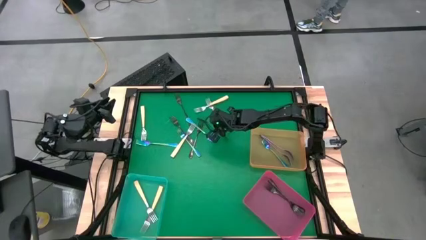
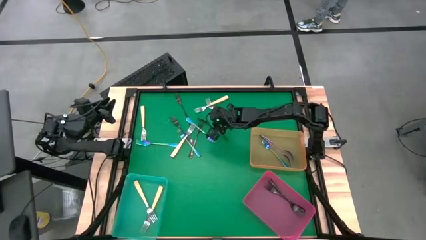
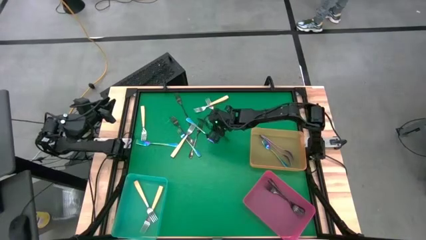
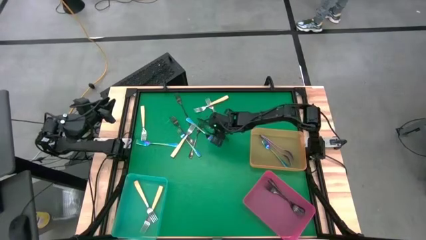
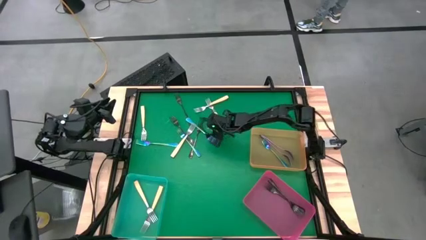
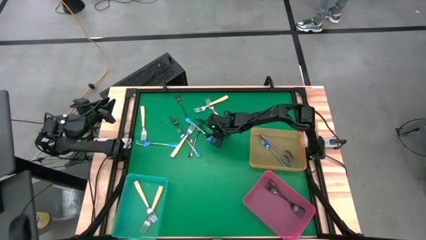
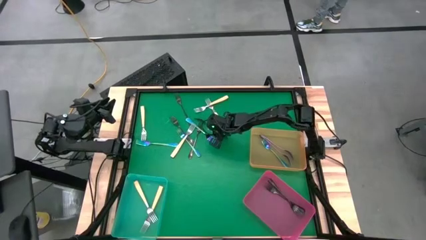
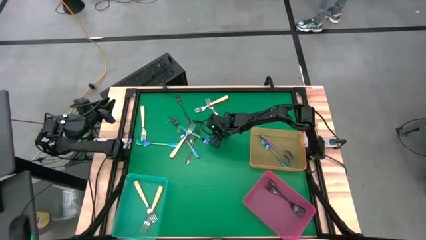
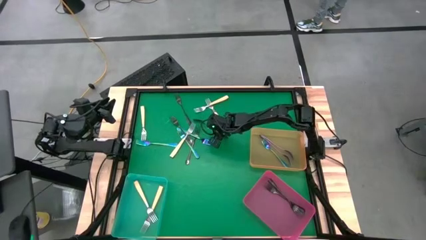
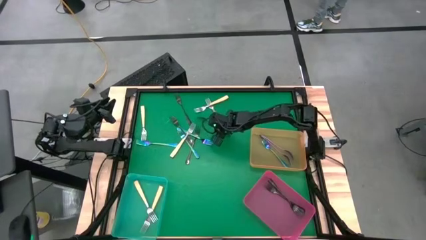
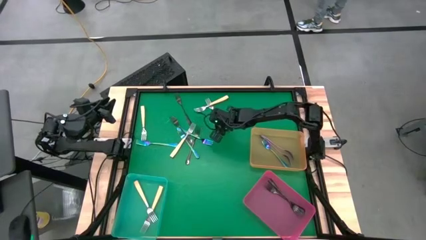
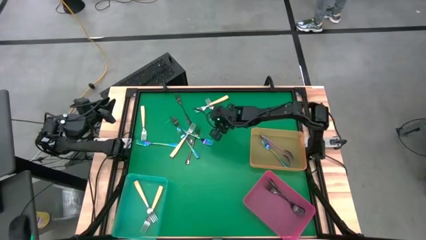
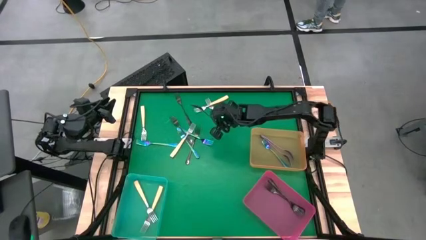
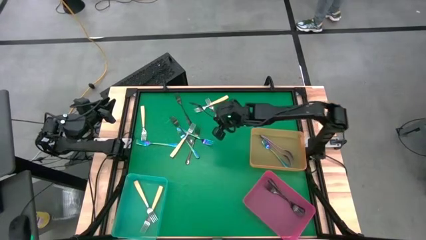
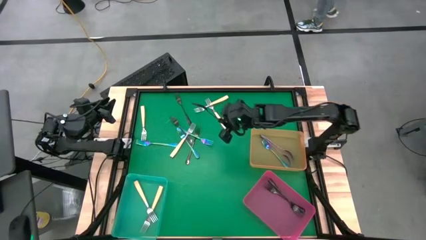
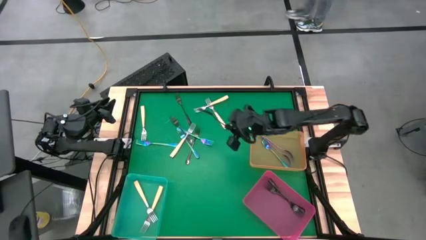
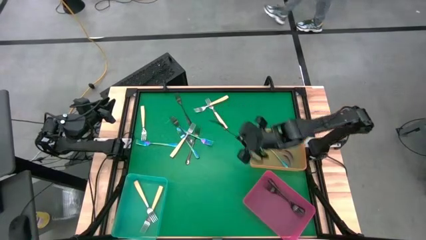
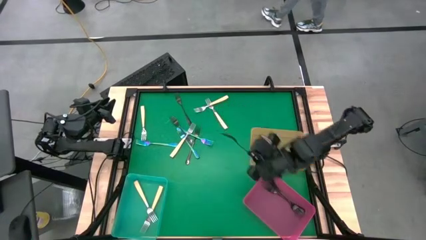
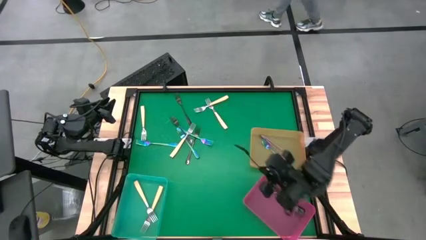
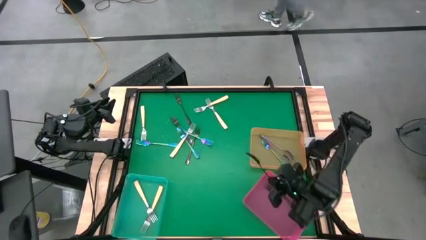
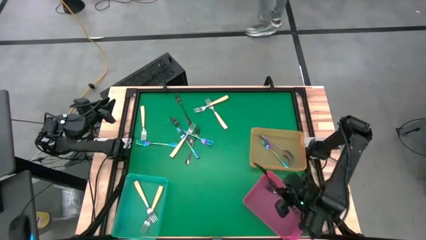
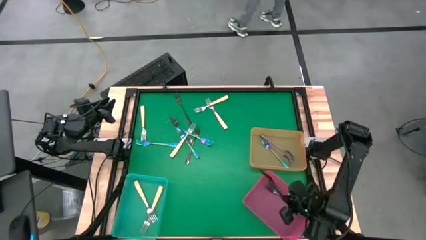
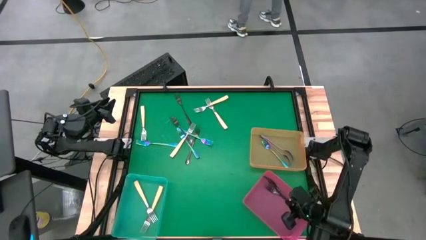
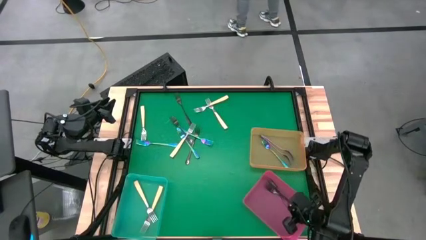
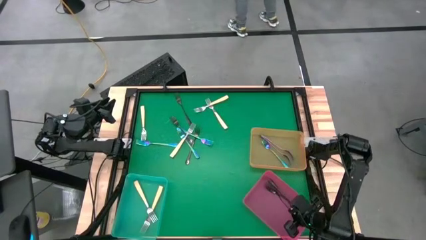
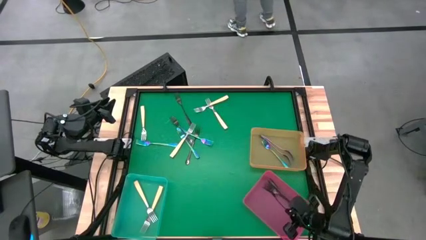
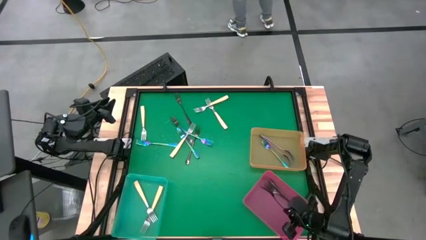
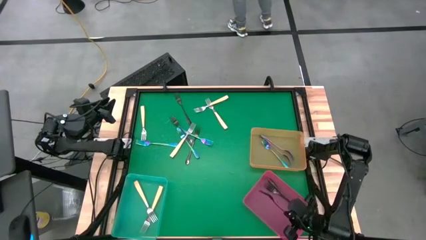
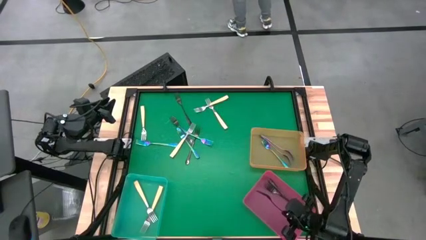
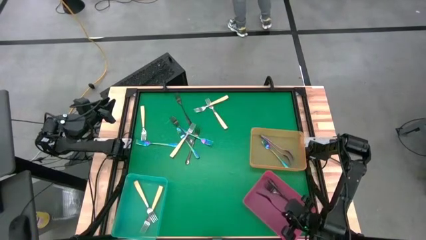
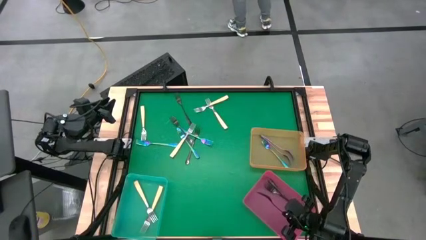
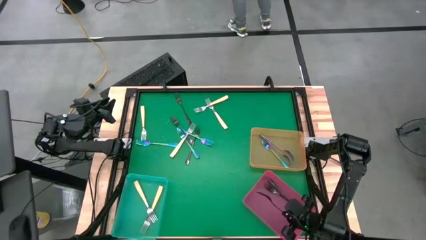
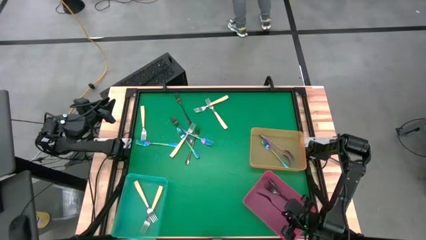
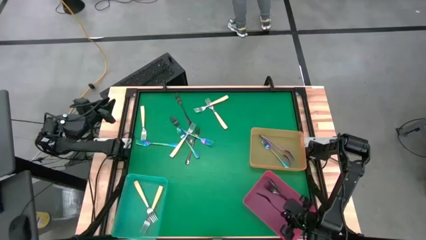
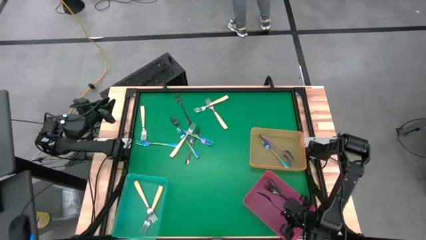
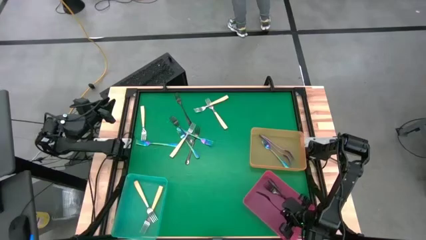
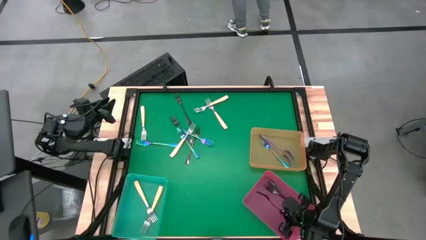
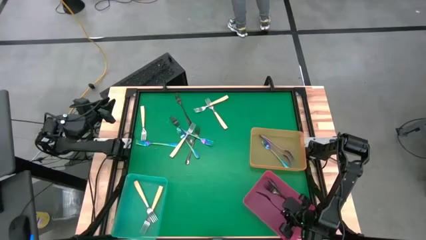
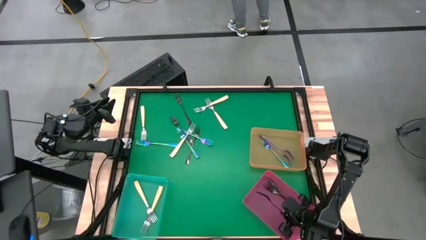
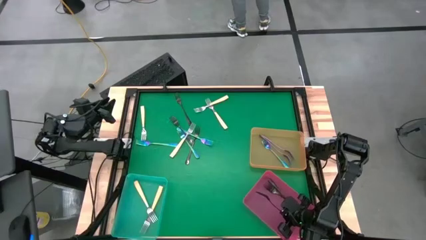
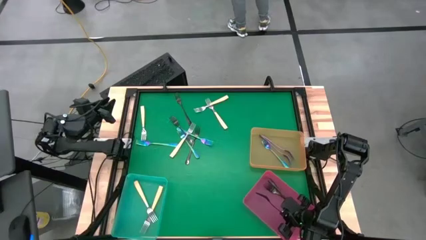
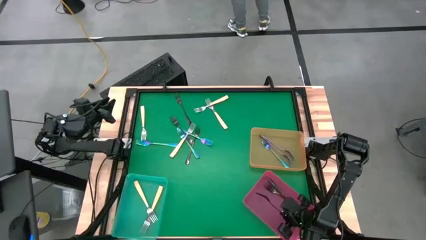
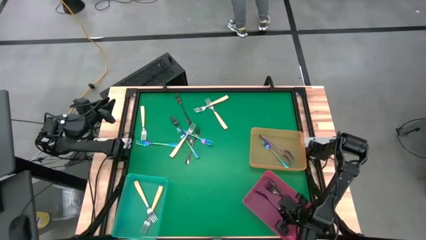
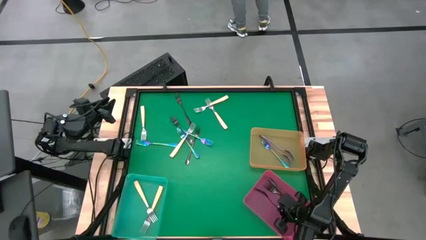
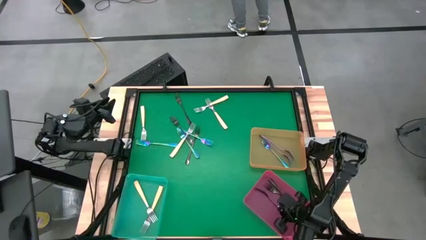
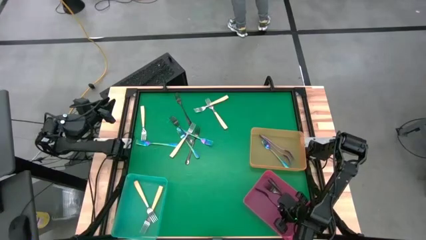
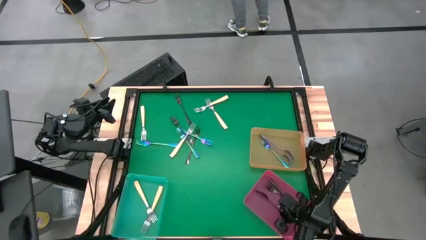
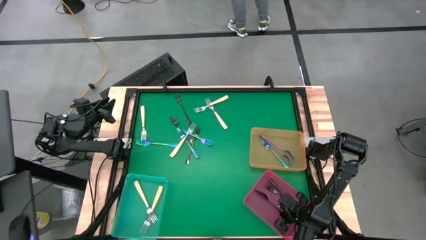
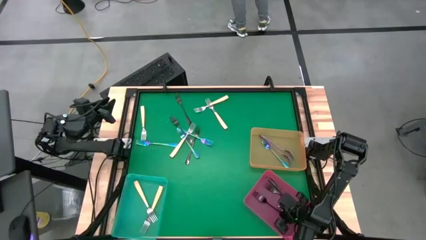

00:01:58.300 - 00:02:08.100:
Task: Sort silverware by color (type)
Put the black fork into the pink bin

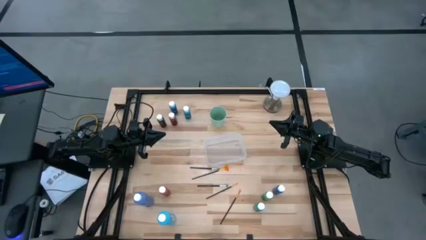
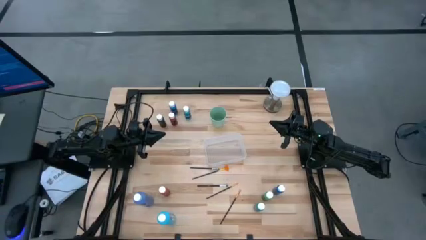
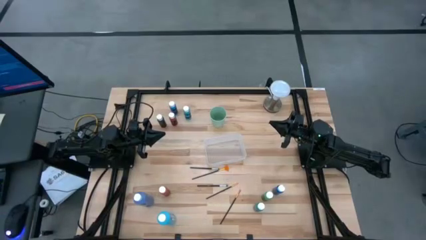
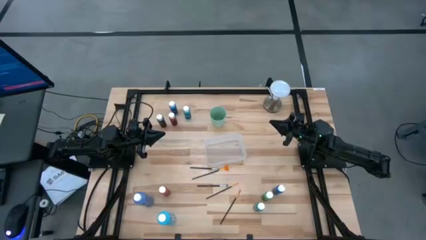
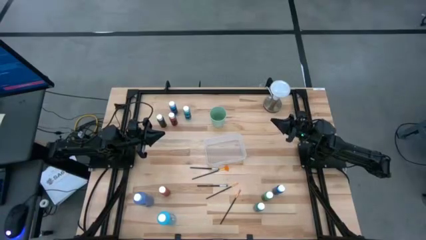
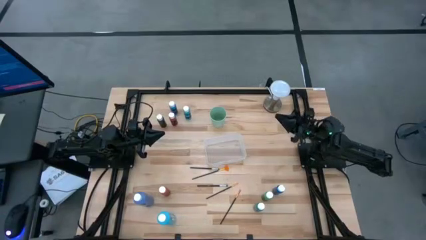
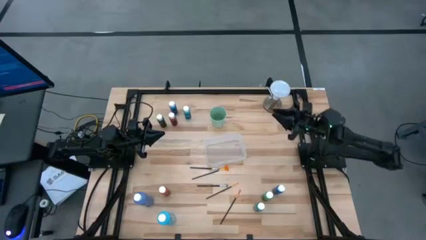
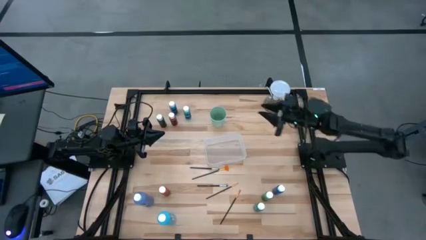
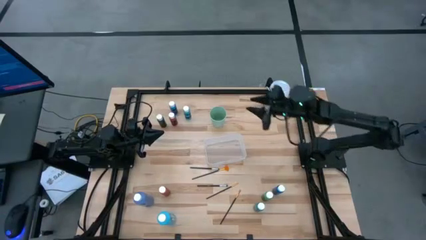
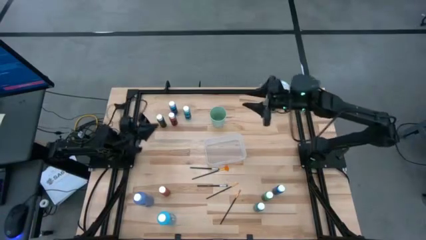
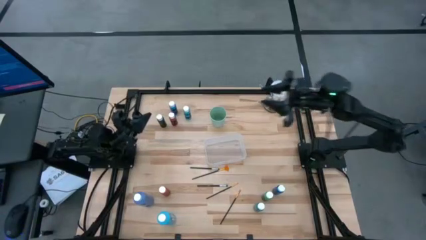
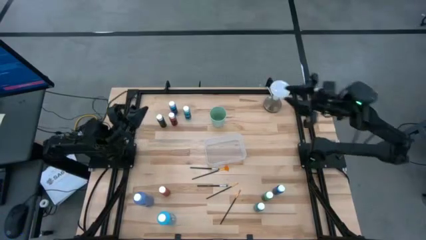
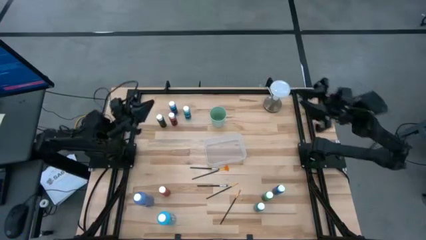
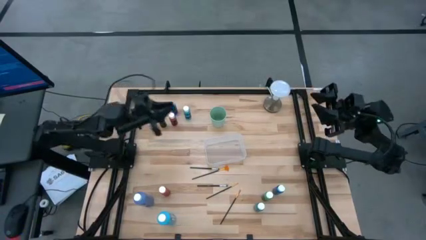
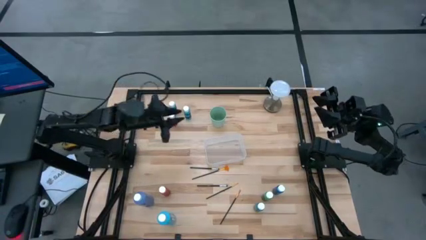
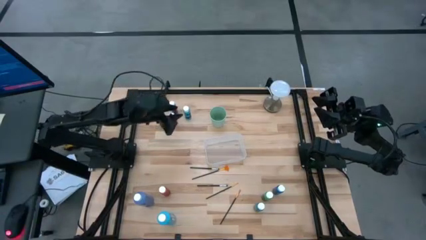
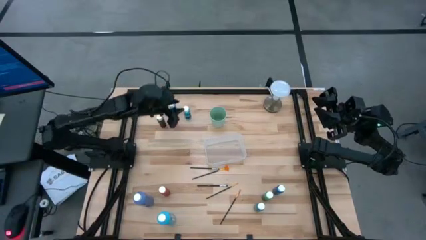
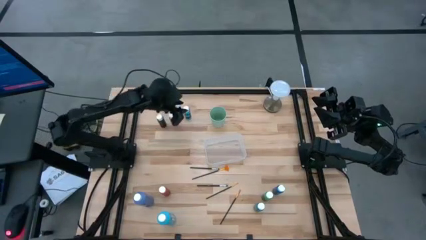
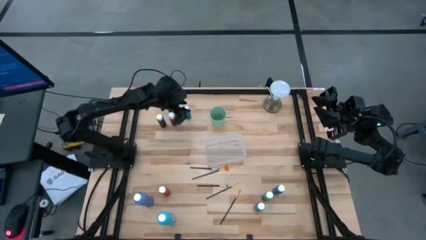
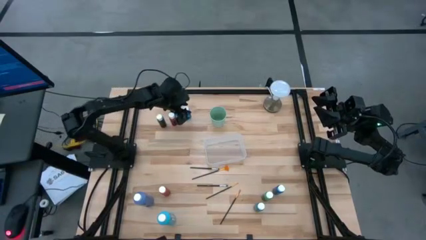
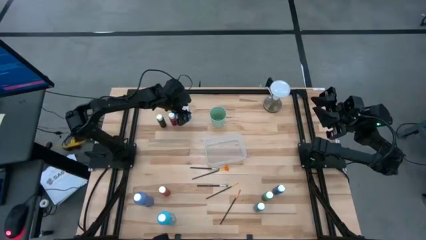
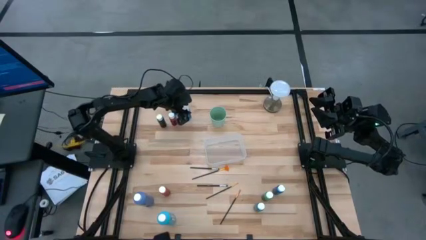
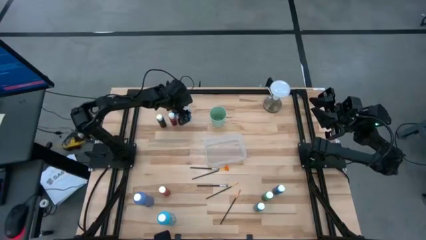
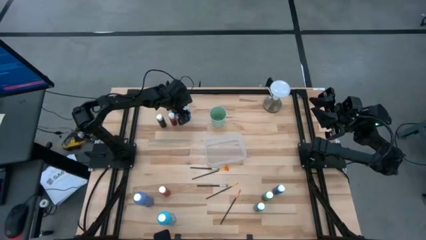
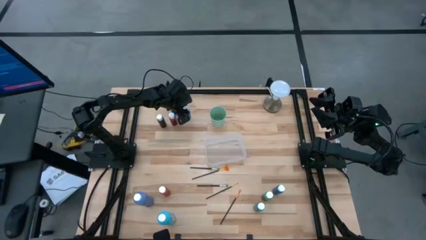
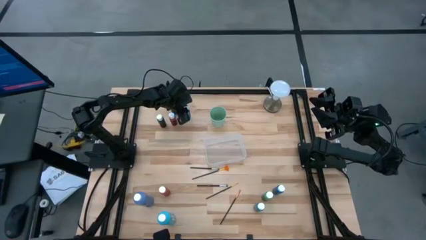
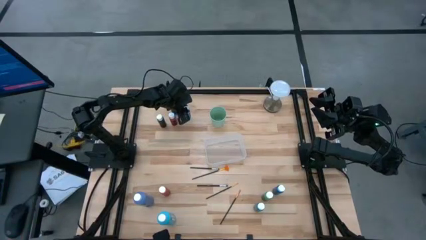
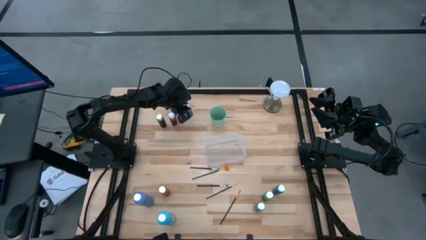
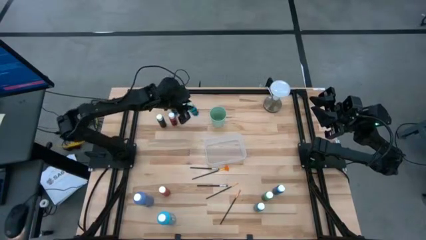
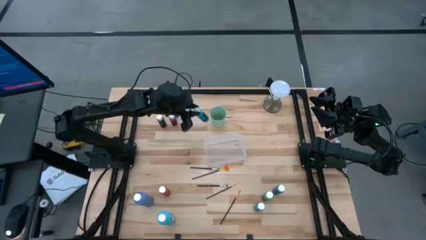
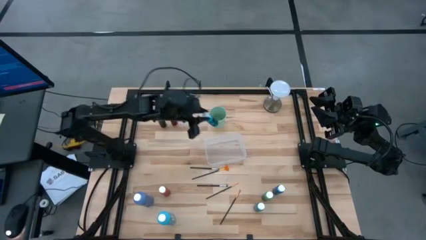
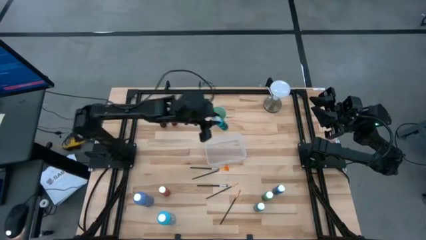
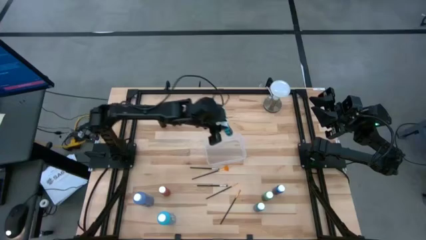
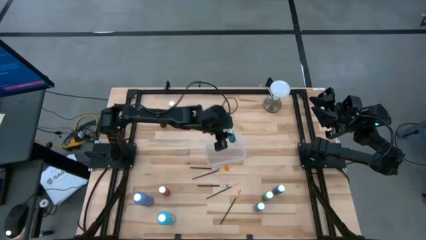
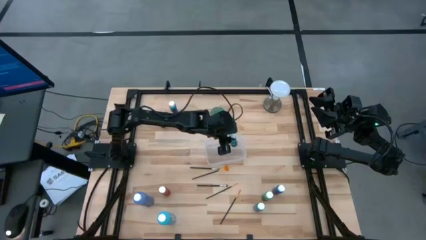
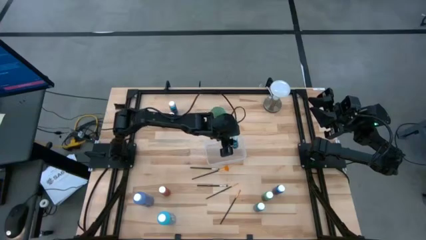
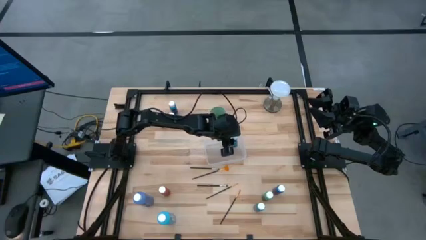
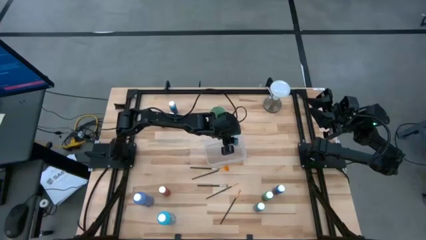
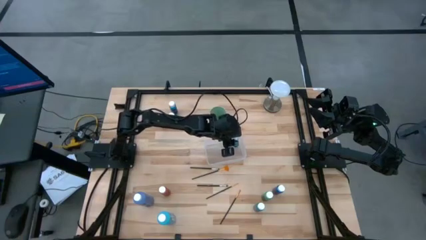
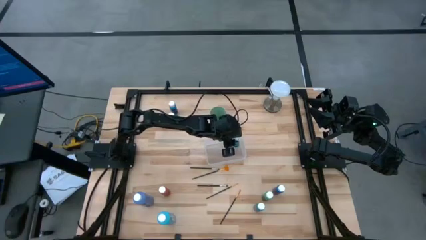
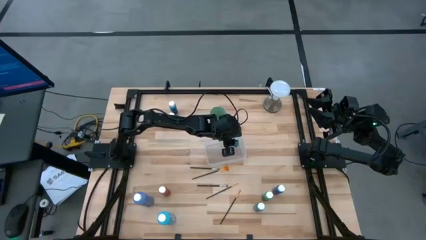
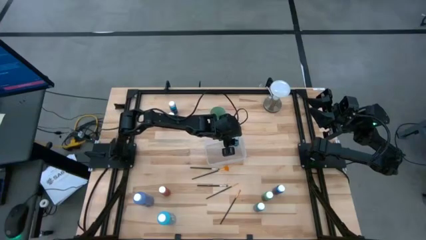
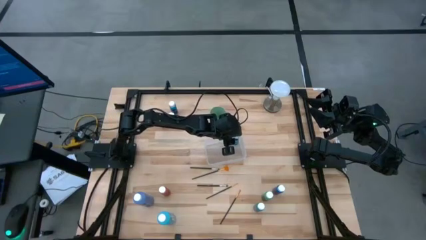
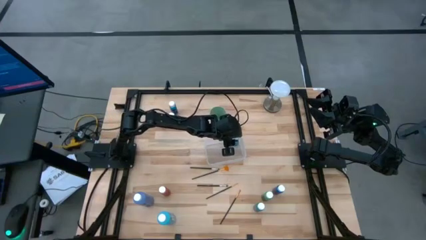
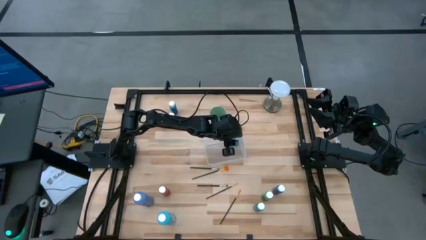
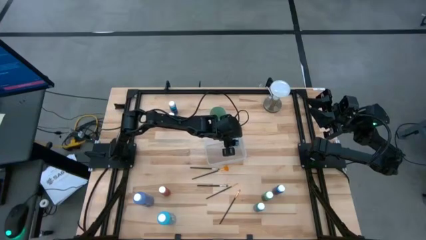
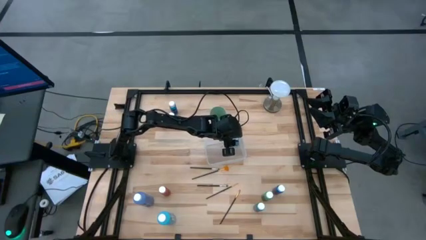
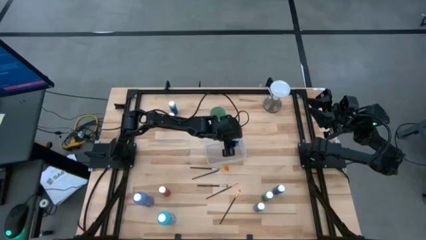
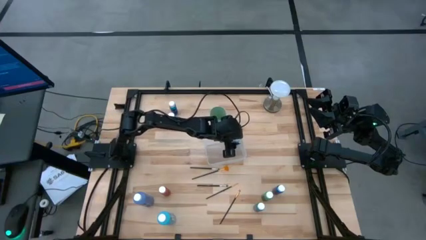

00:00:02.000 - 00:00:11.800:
Task: Pick & Place Paint Supplies
Put the small light blue paint bottle into the transparent bin
